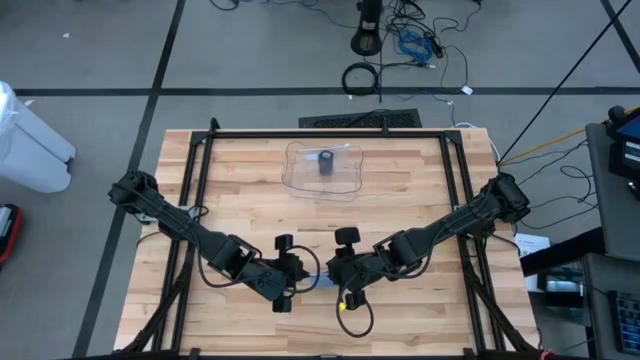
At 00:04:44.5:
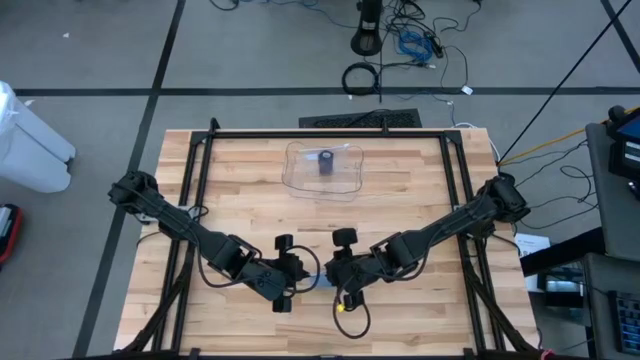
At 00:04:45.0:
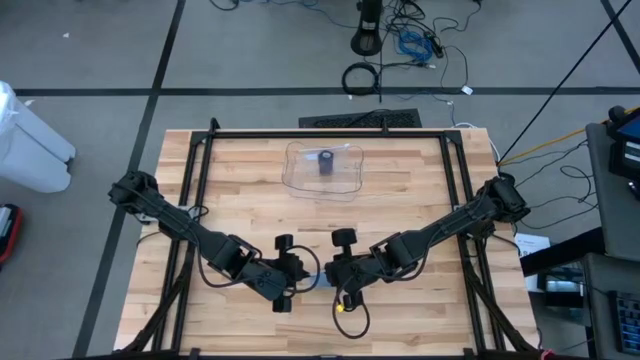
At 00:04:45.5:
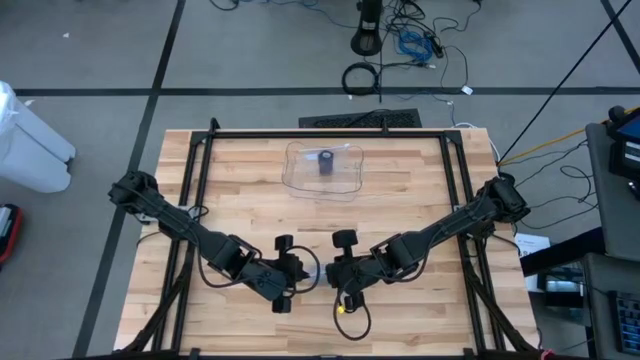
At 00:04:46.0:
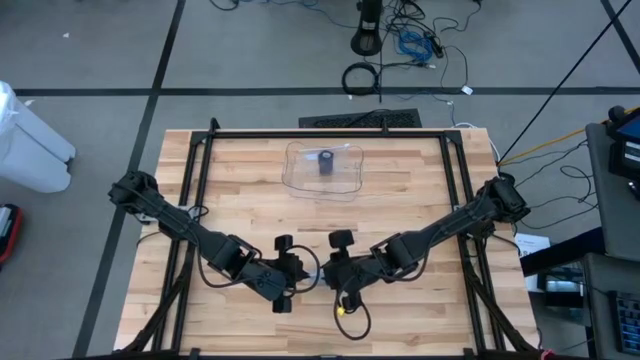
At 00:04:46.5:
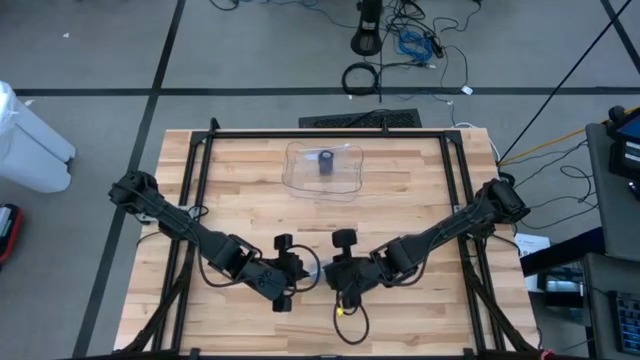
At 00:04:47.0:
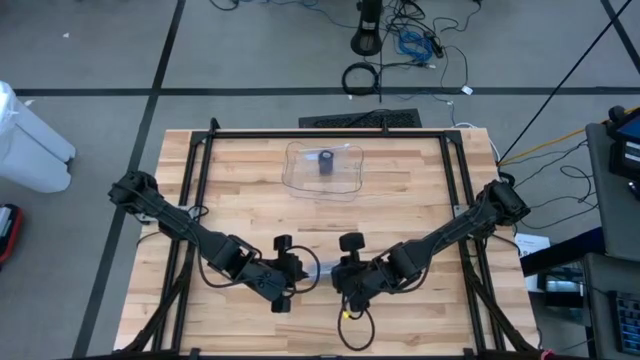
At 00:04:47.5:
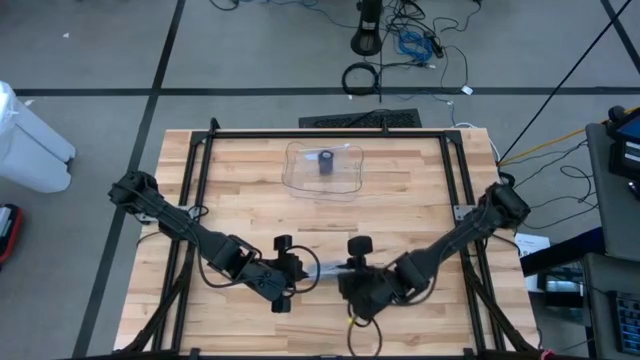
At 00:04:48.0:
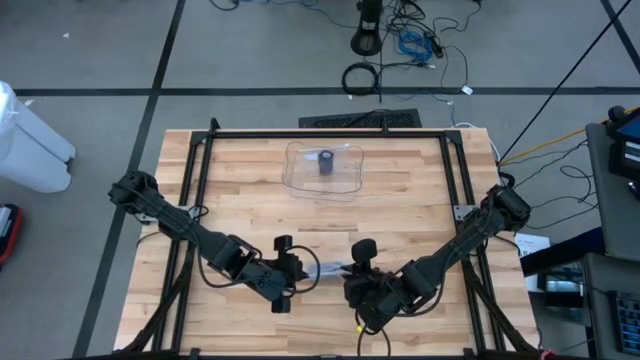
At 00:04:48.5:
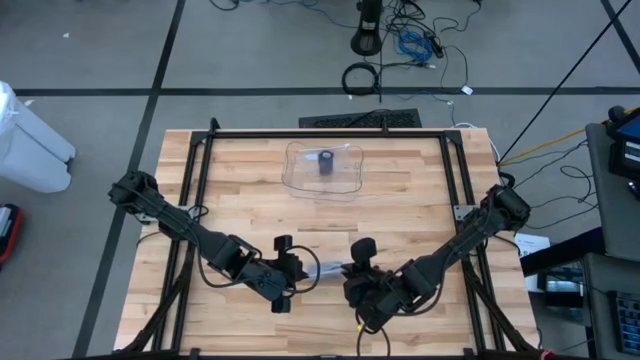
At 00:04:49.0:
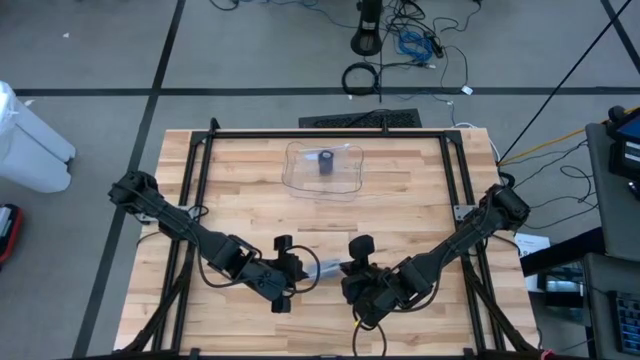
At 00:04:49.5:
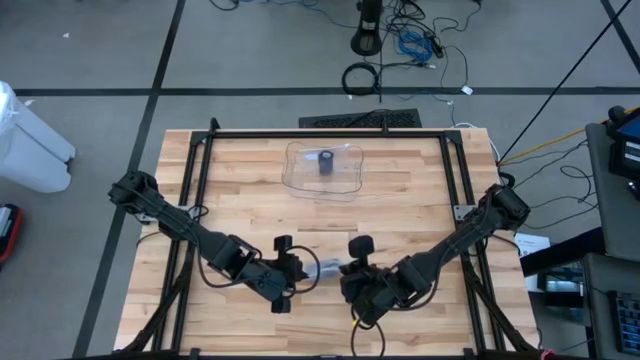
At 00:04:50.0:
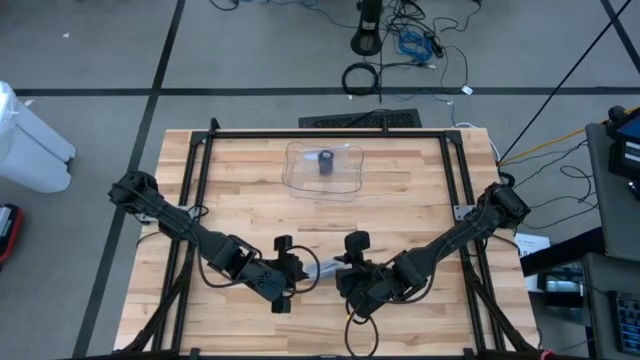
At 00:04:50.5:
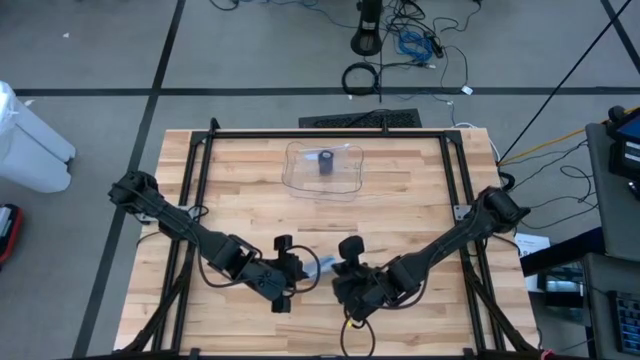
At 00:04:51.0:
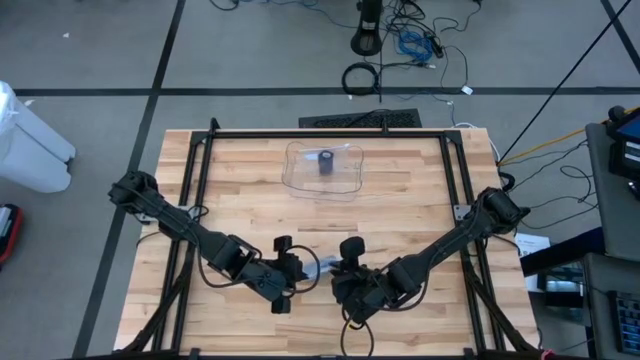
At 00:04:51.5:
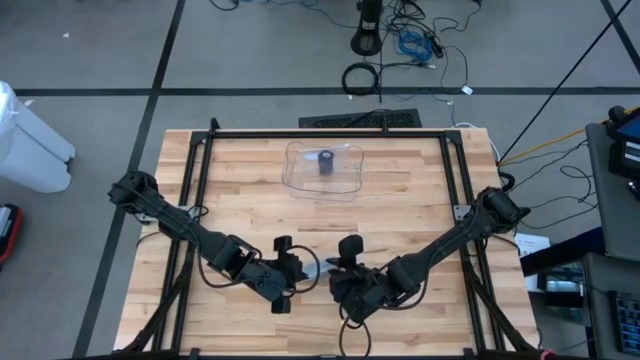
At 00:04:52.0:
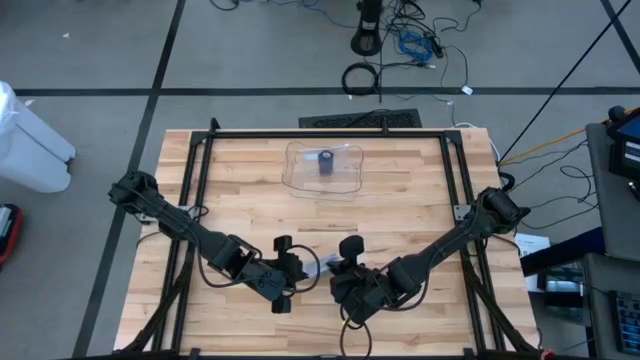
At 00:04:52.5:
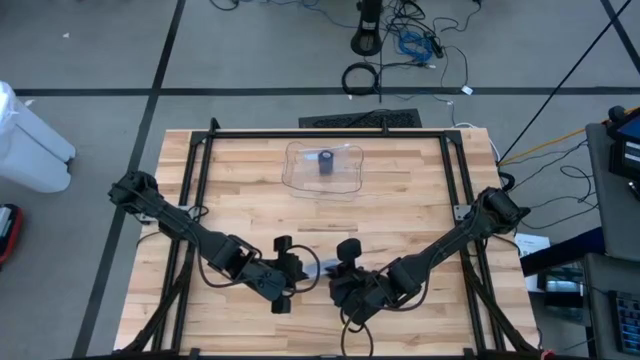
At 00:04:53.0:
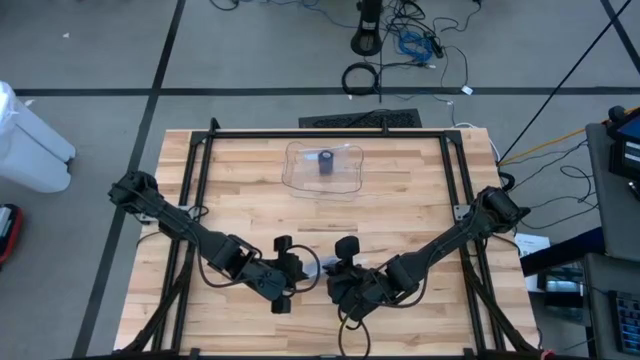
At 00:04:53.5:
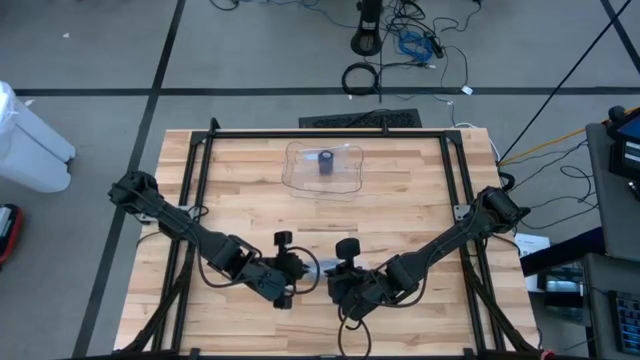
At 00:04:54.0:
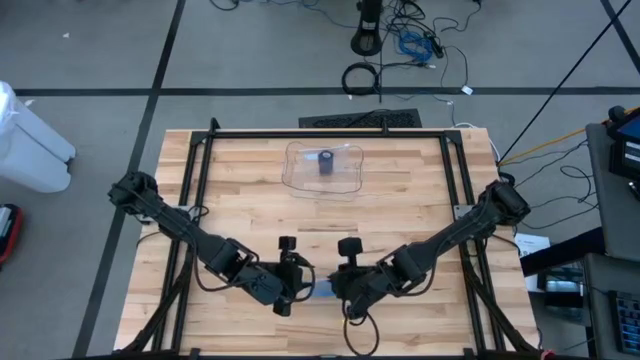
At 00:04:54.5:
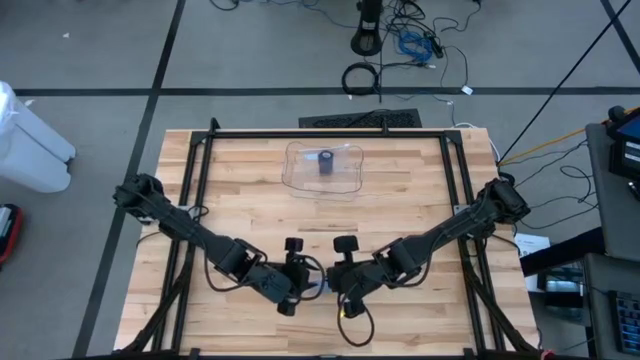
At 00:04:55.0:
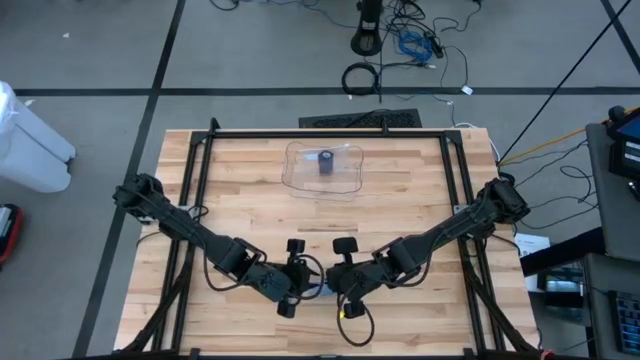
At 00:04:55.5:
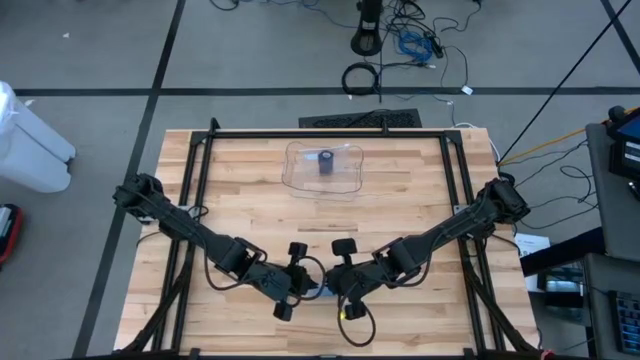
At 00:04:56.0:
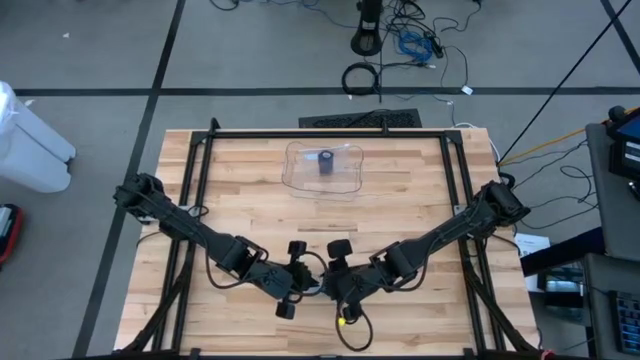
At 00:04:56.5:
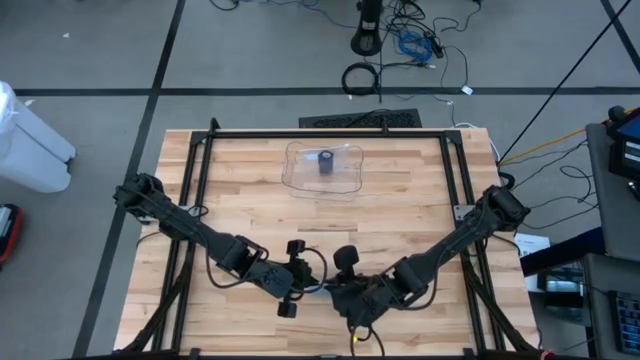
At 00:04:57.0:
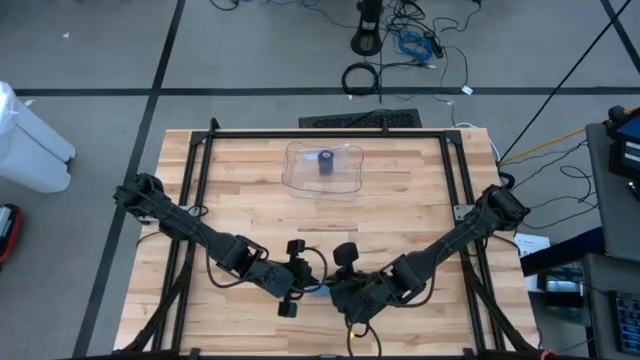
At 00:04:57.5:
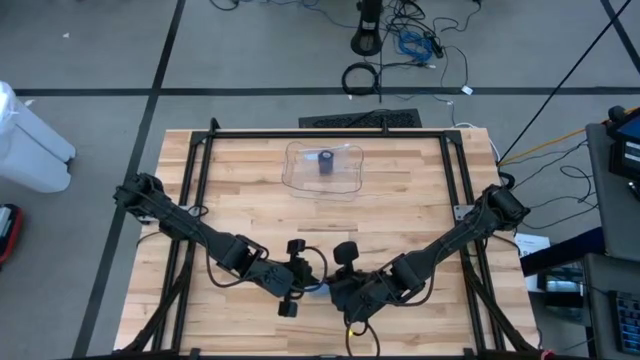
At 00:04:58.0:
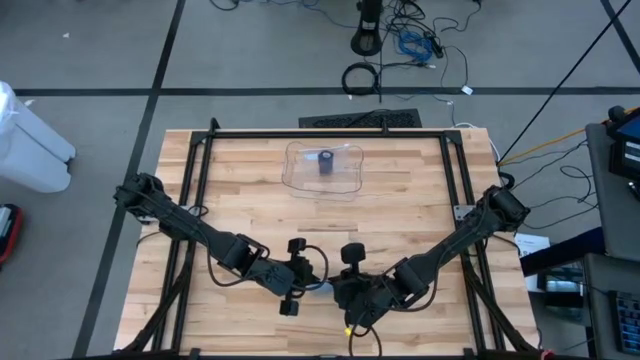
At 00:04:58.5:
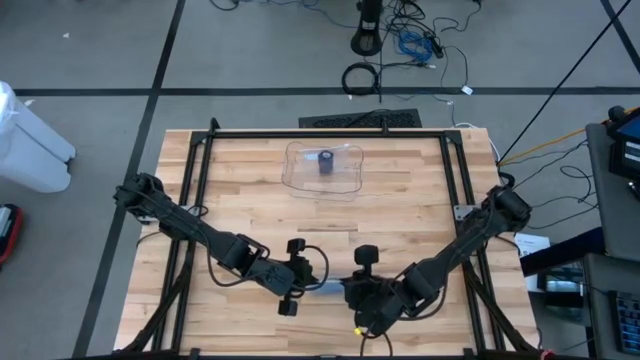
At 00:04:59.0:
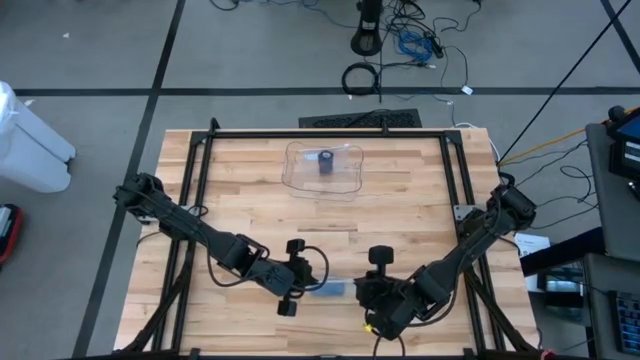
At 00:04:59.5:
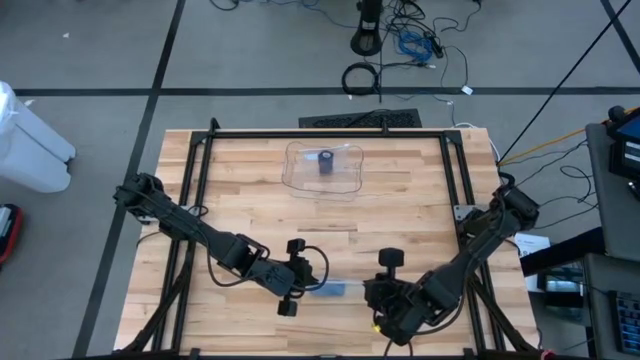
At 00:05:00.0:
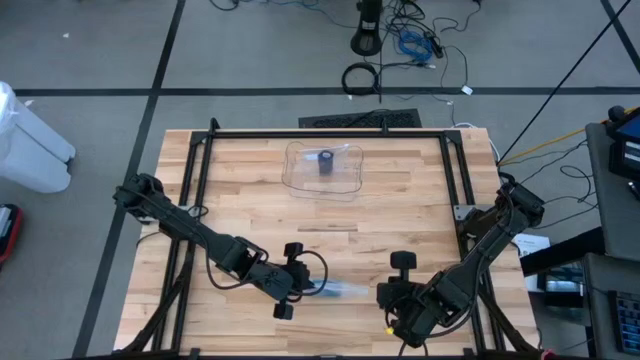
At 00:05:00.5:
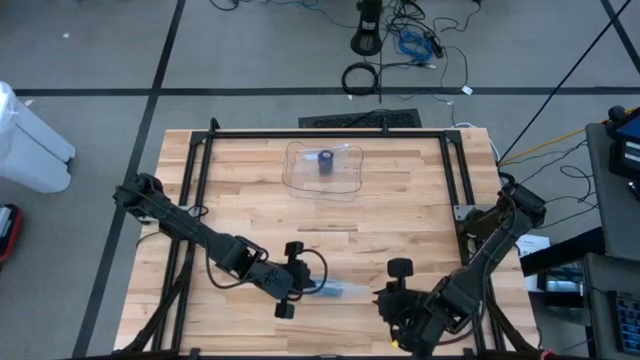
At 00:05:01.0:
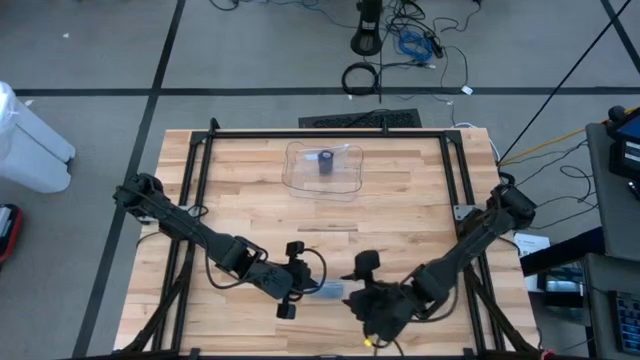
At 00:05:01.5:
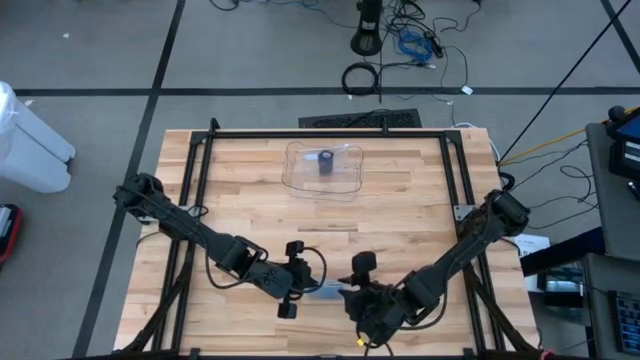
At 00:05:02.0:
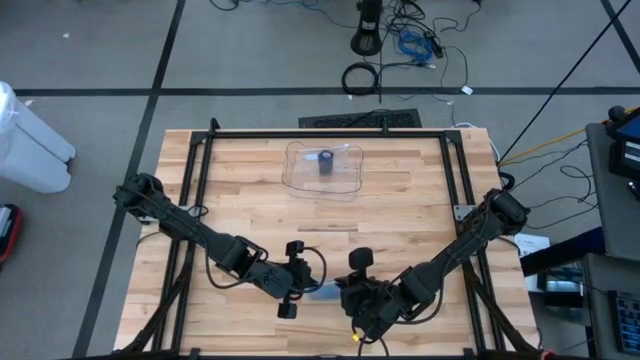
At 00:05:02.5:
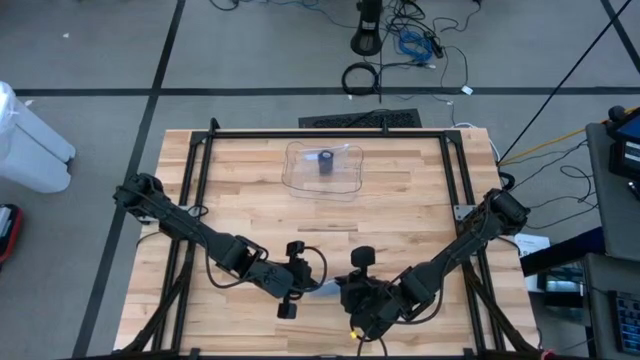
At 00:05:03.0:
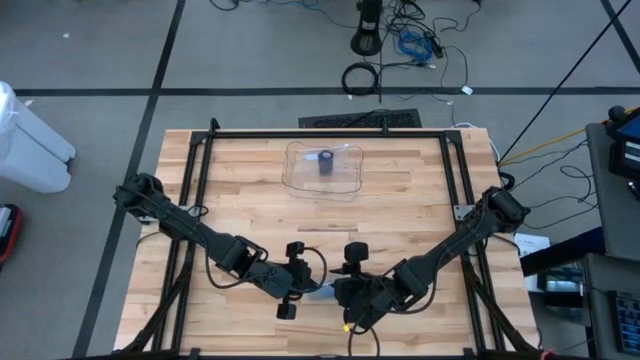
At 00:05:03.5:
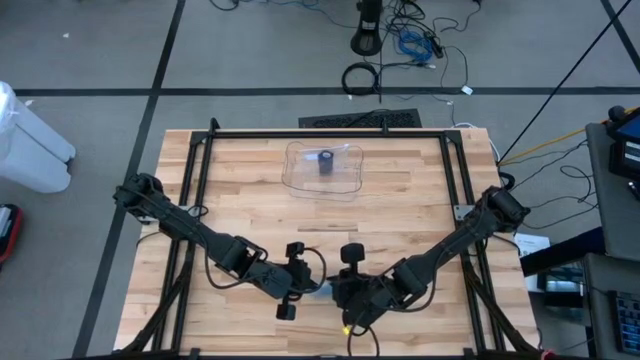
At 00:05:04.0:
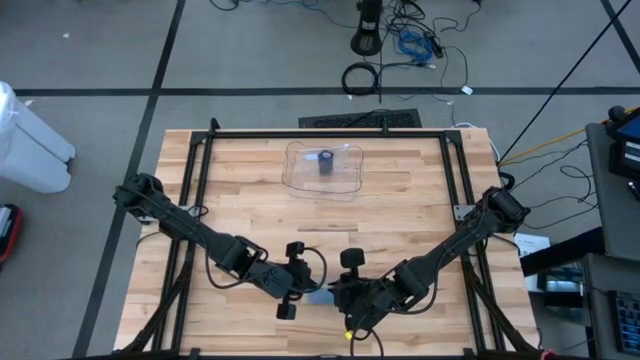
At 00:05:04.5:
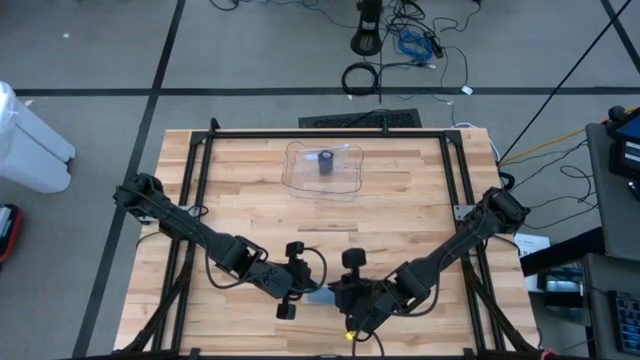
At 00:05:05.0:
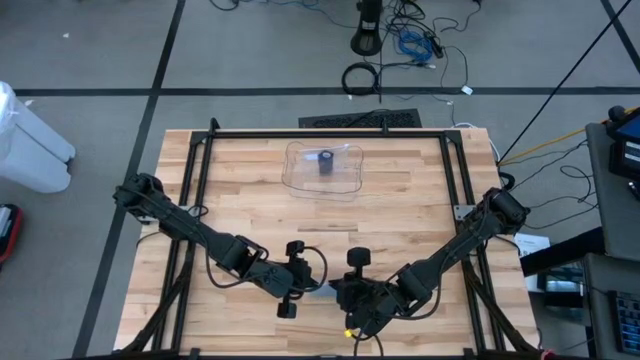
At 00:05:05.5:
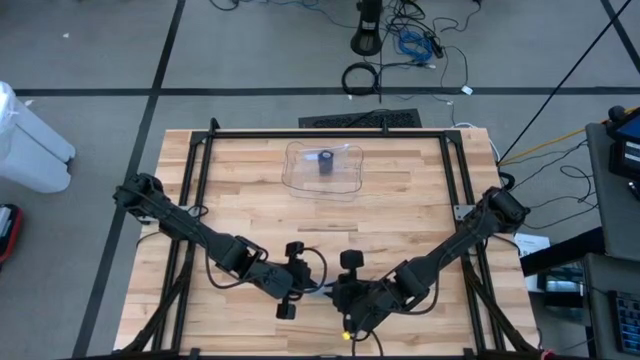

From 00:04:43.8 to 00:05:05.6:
Task: Roll bandage
Close the transparent zip bag
